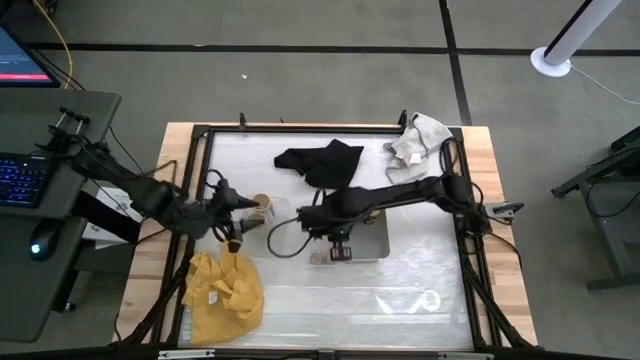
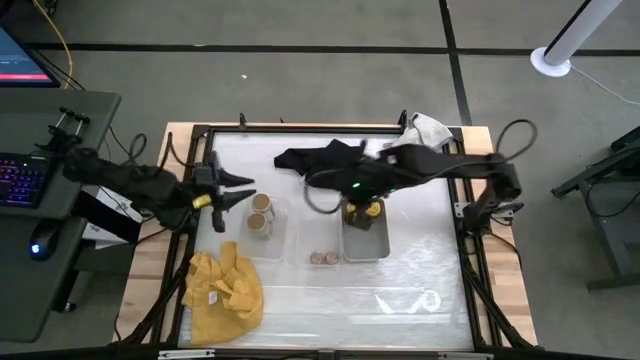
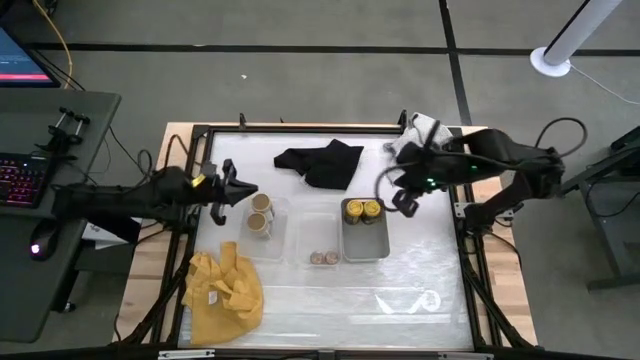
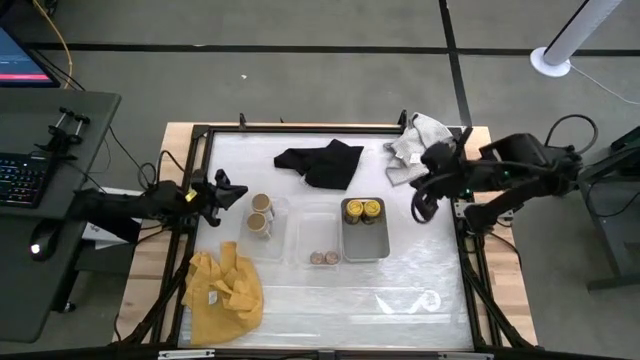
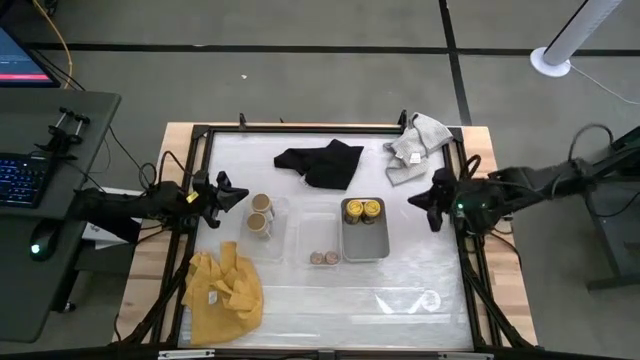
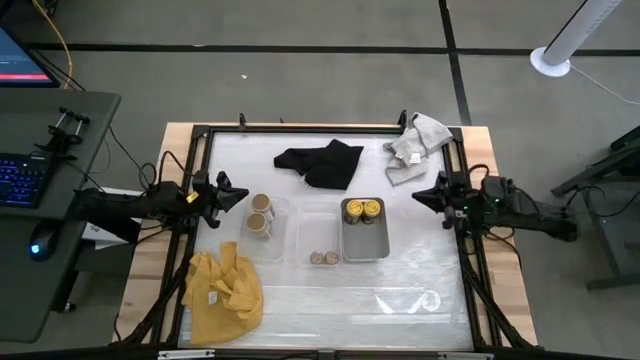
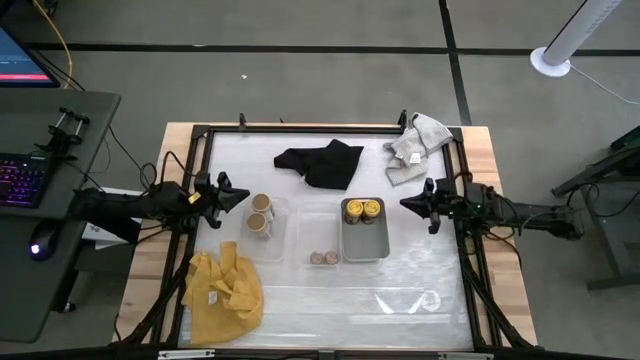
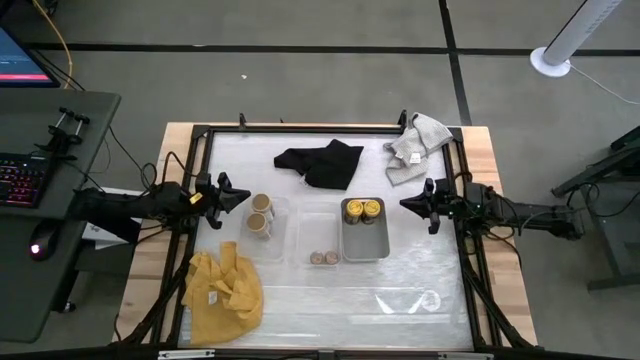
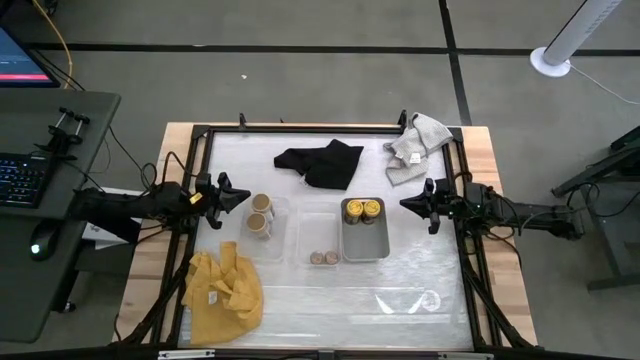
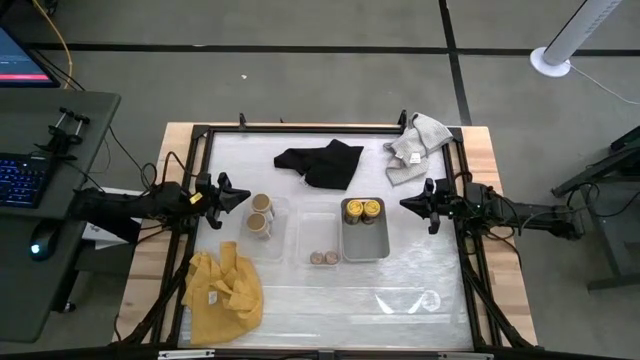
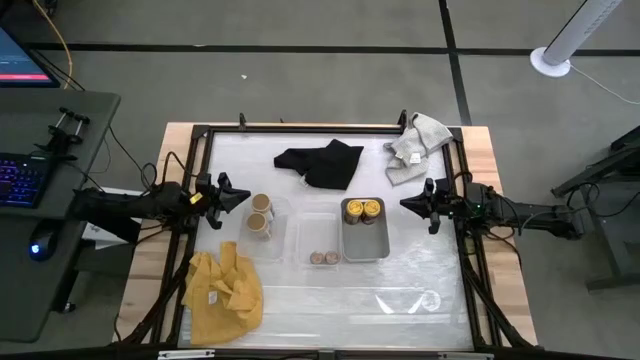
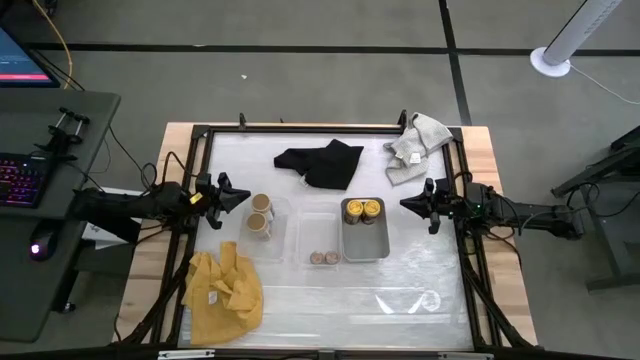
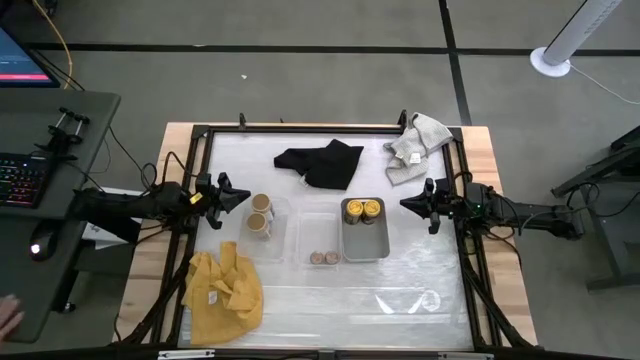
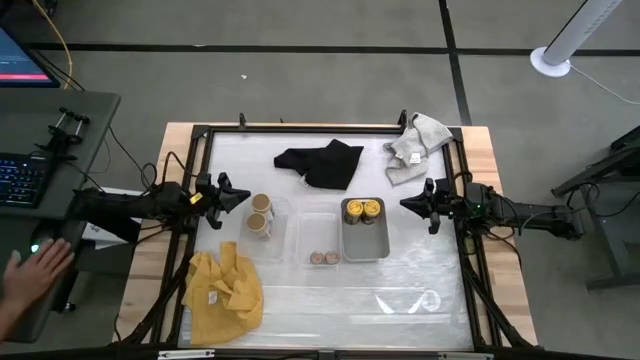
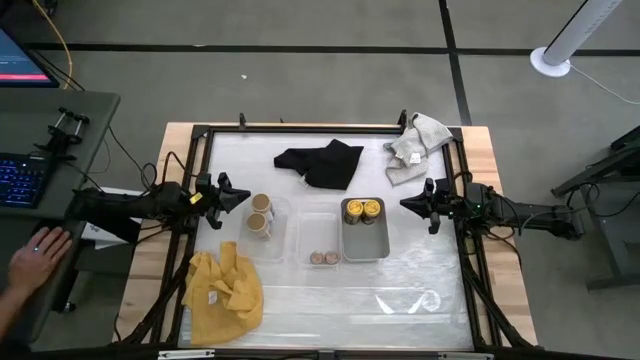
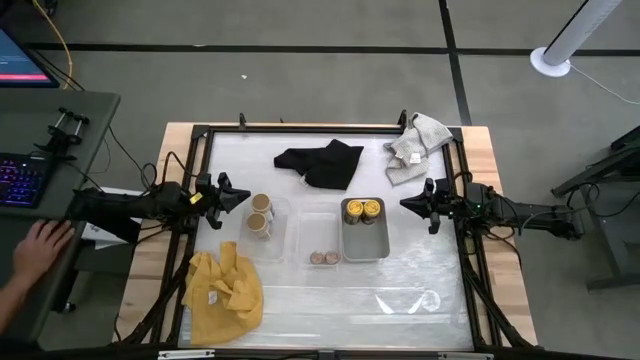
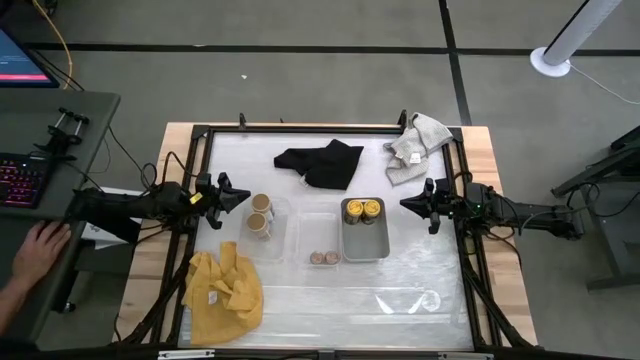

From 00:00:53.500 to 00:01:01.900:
Task: Sort spices by type
Return to Home Position

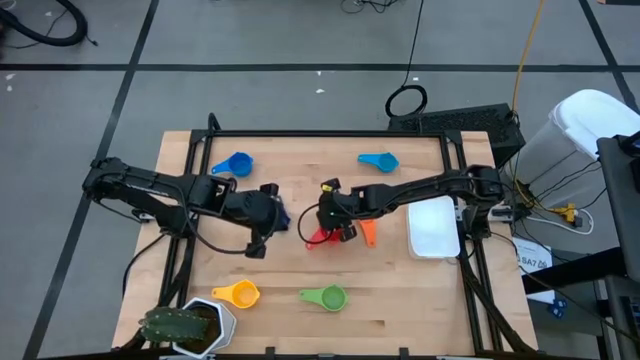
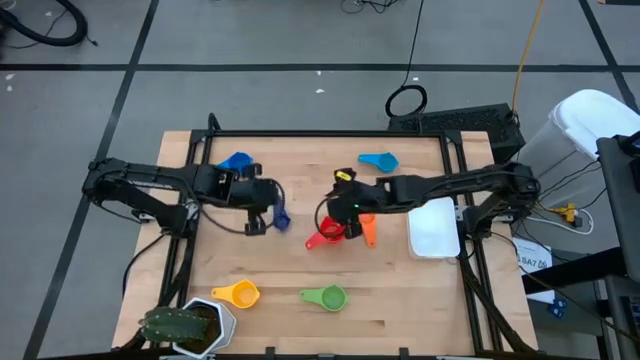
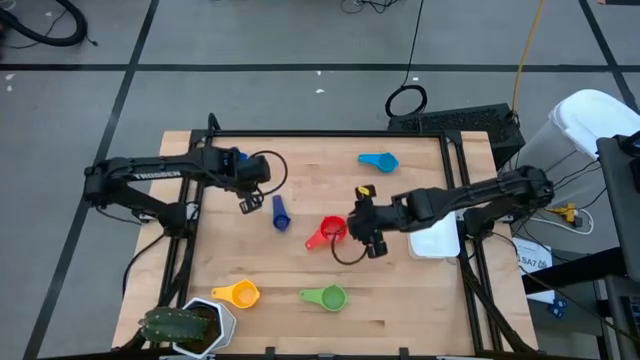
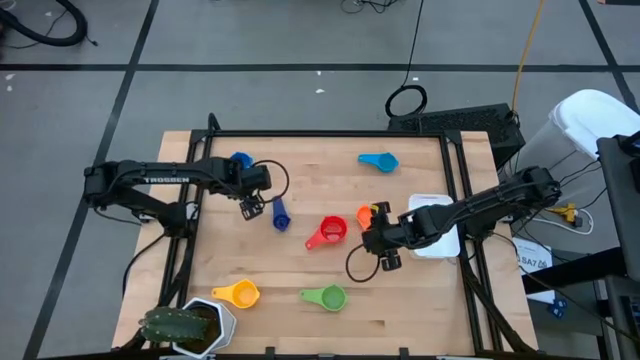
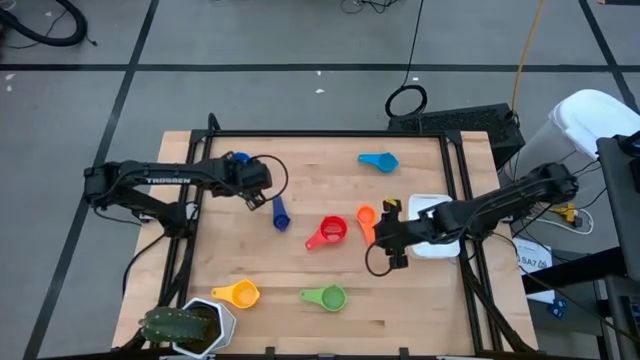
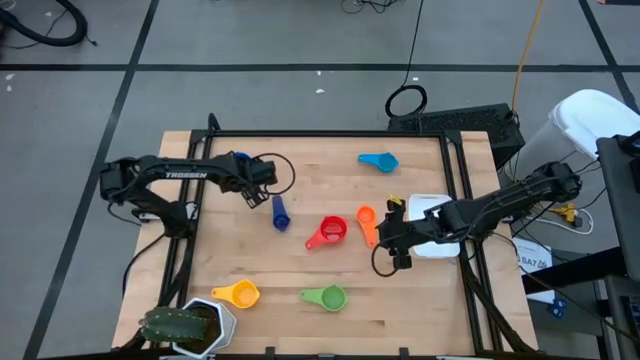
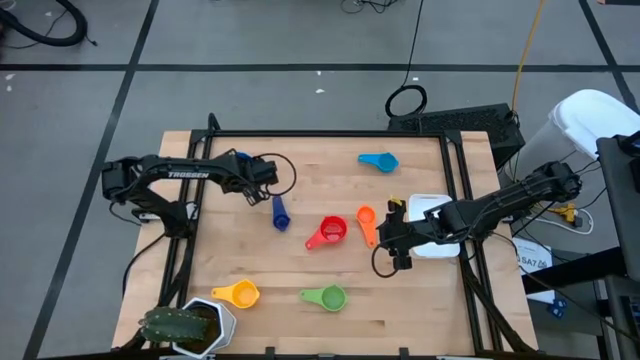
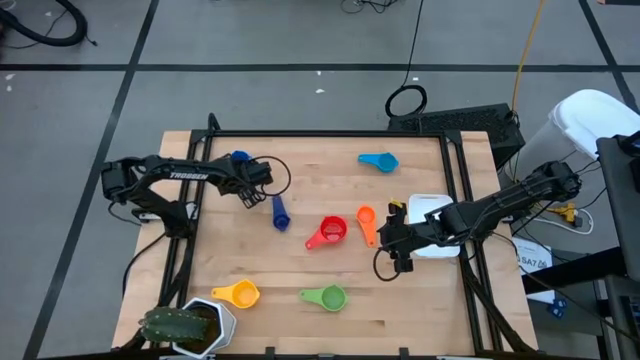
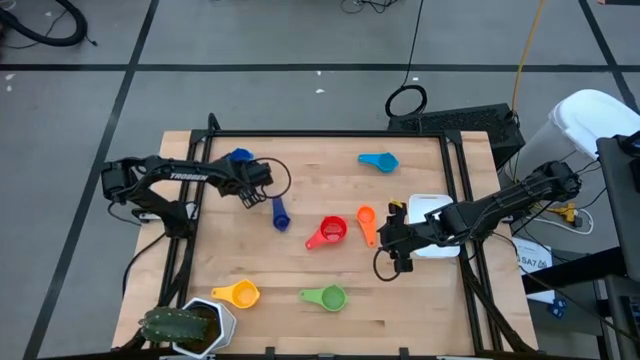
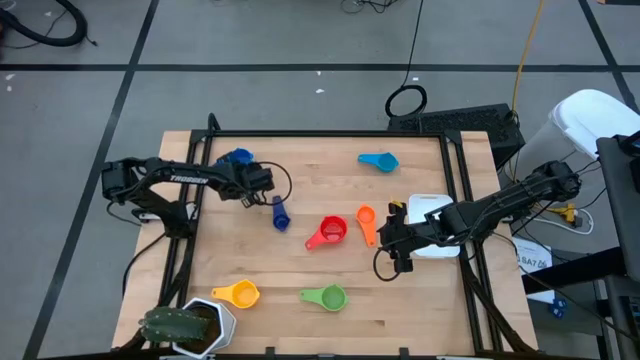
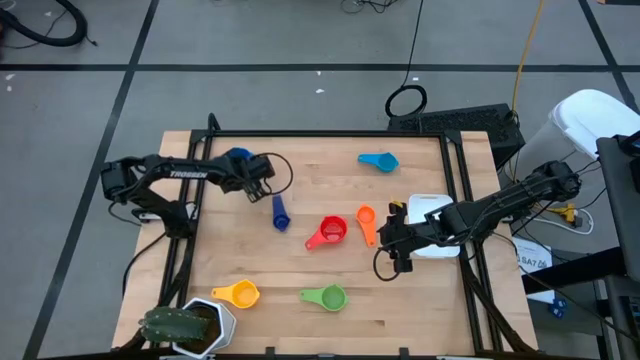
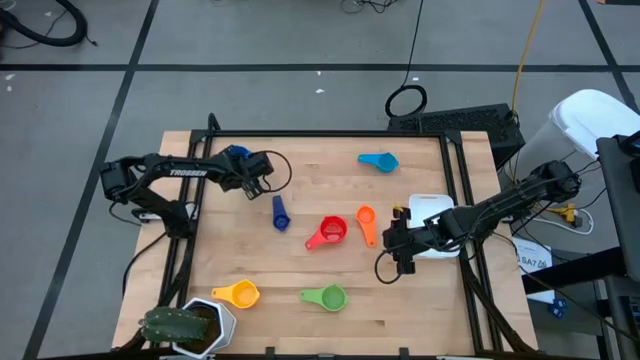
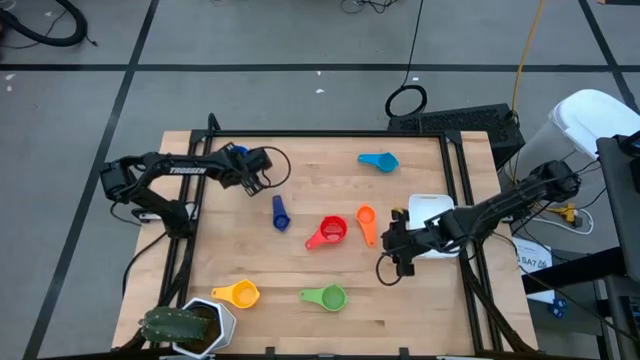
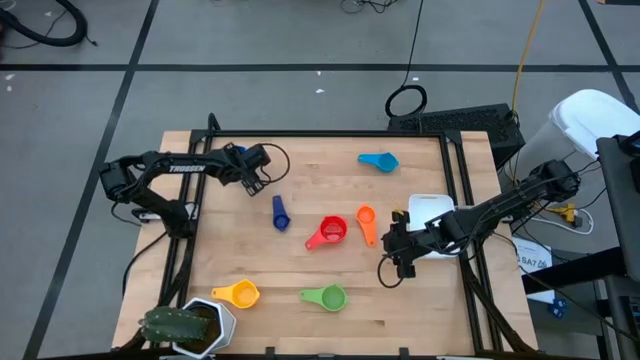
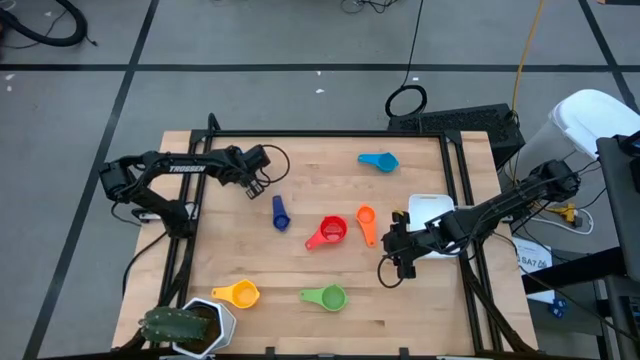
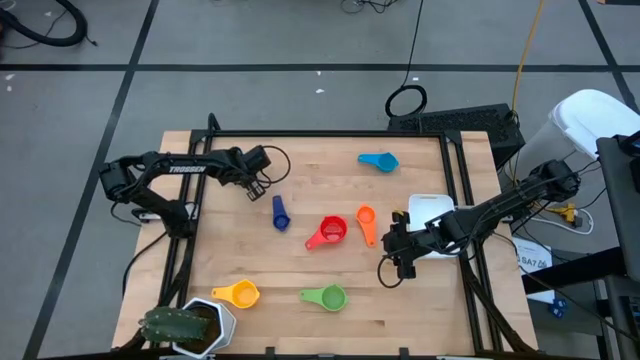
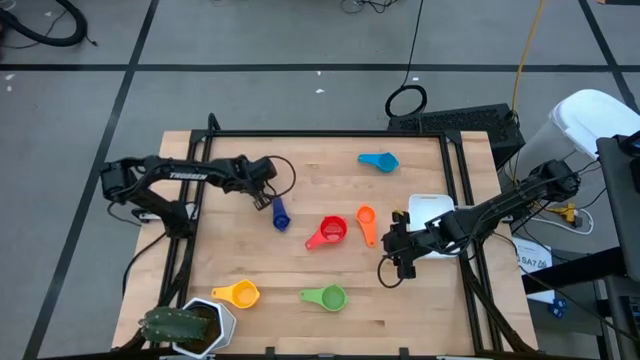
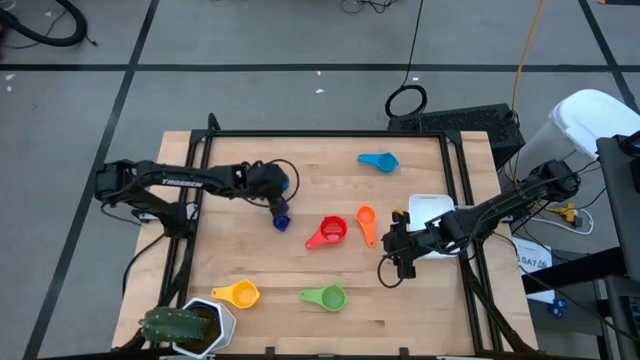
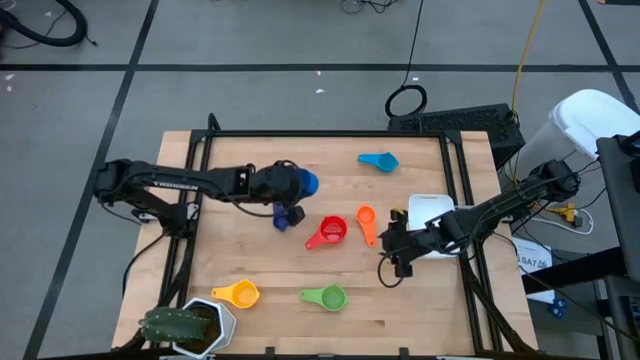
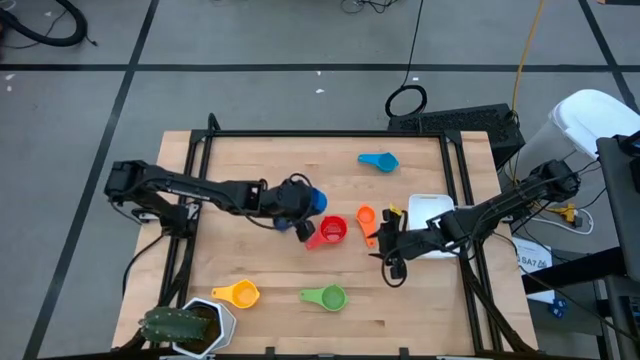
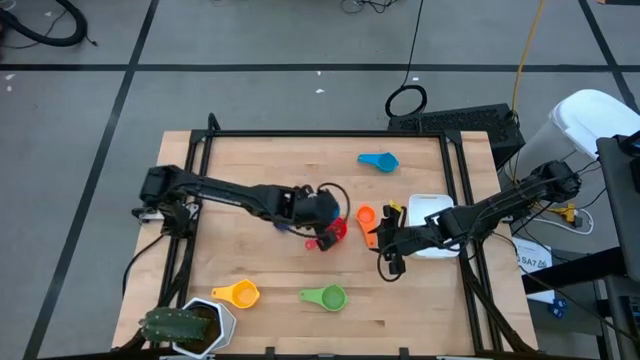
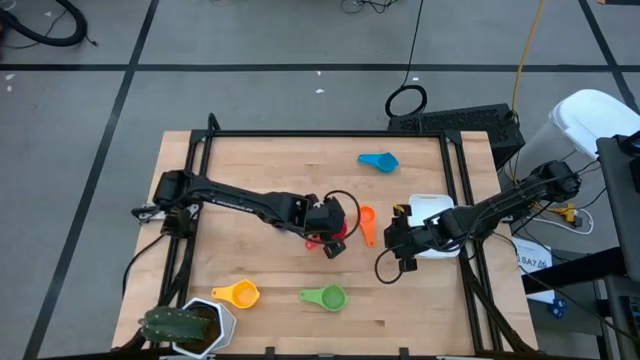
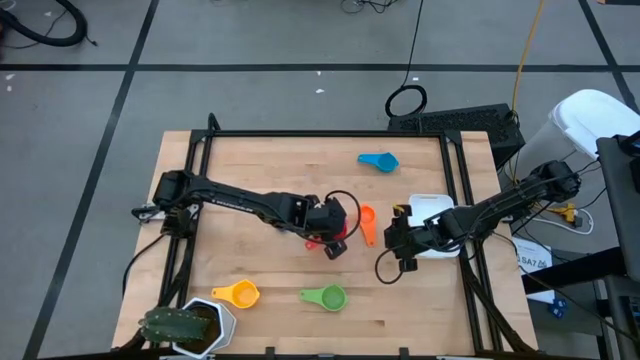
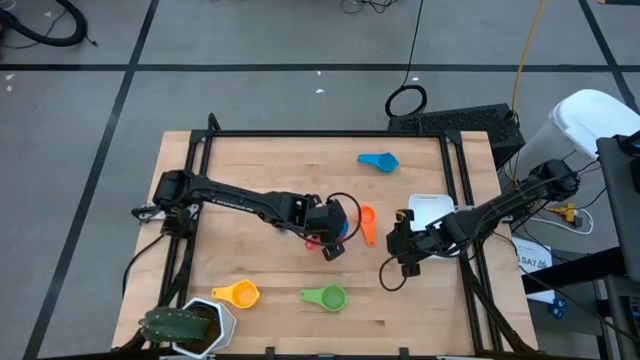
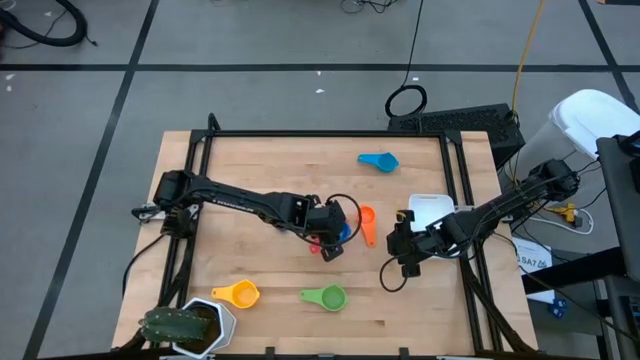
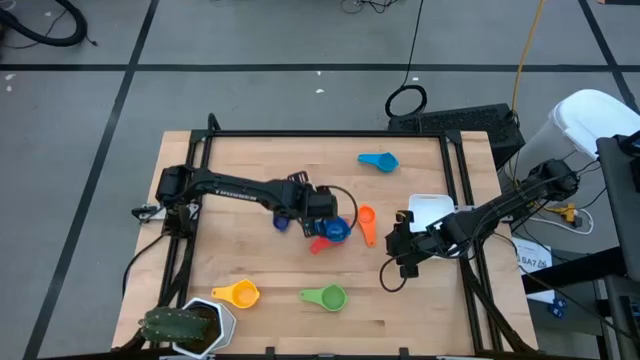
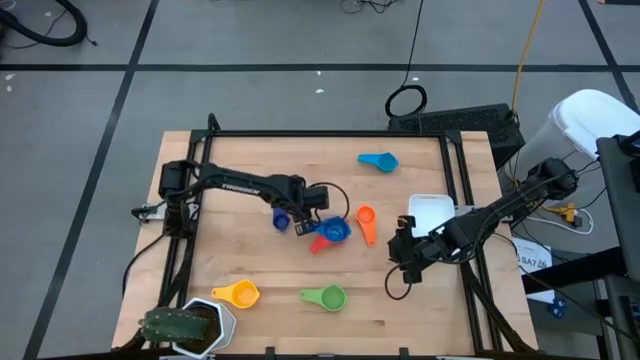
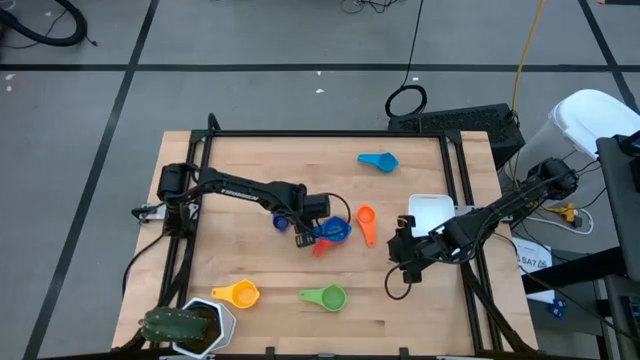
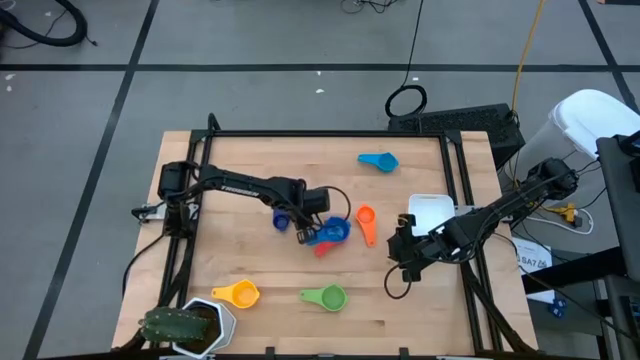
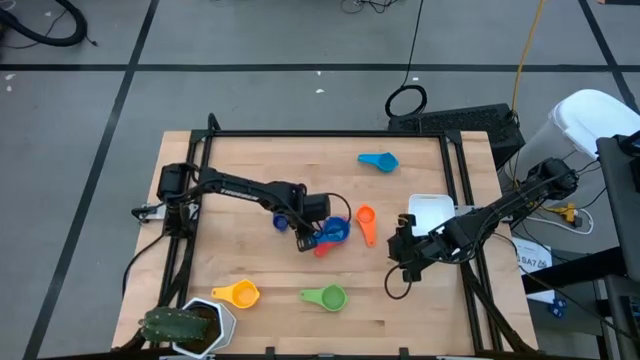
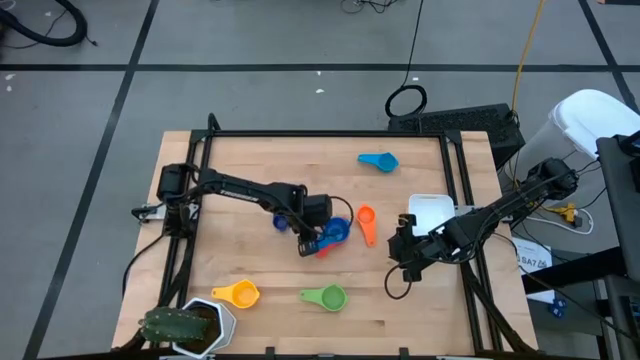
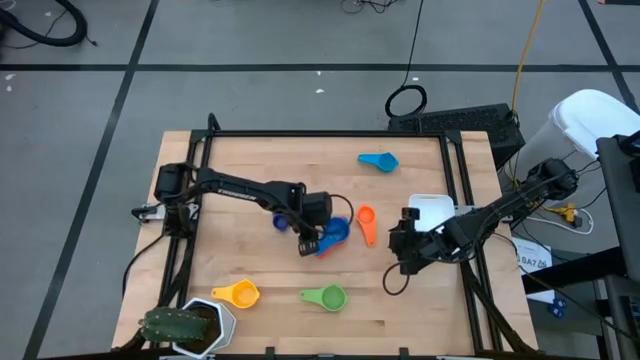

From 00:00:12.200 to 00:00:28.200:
Task: Nest measuring cups in basket
Stack the blue measuring cup on top of the red measuring cup
